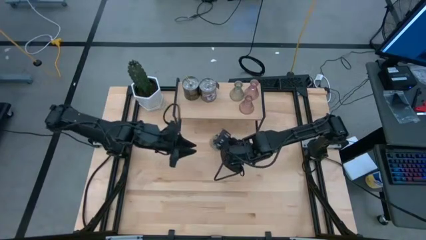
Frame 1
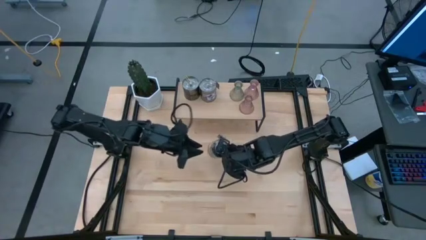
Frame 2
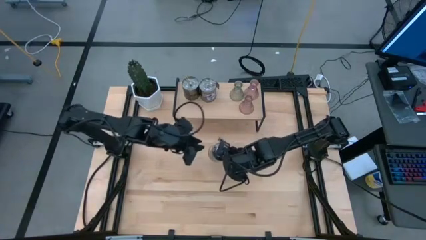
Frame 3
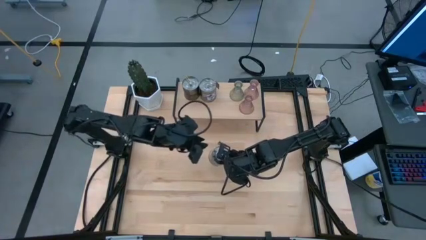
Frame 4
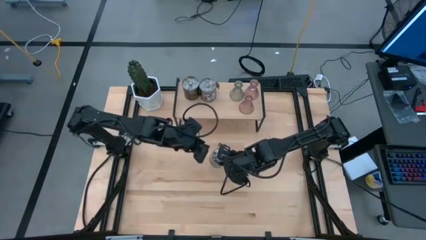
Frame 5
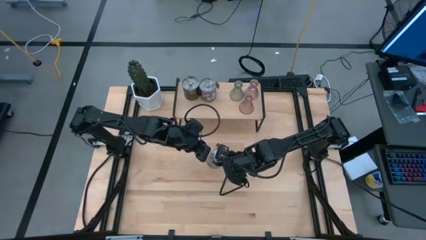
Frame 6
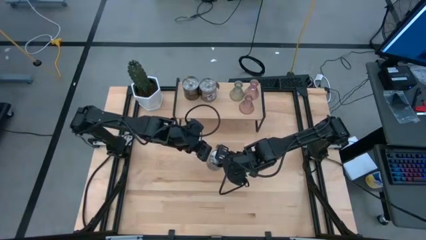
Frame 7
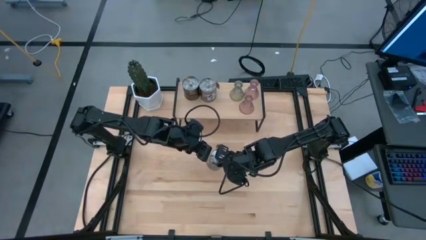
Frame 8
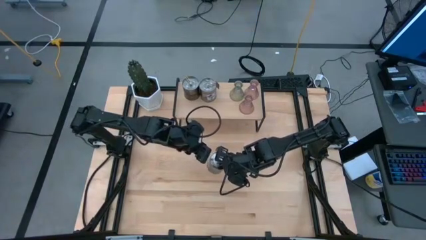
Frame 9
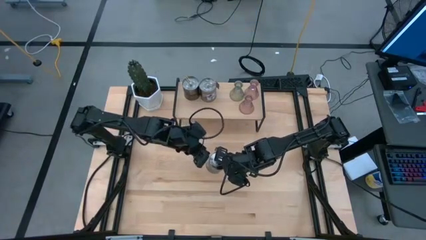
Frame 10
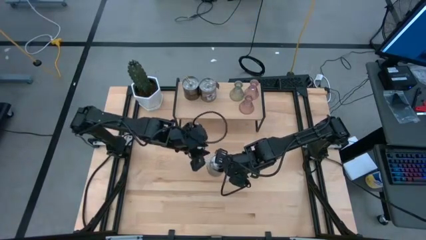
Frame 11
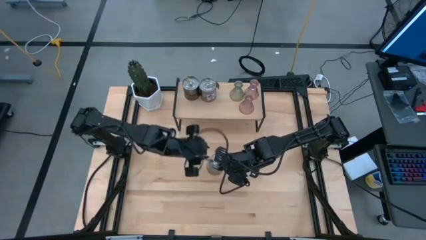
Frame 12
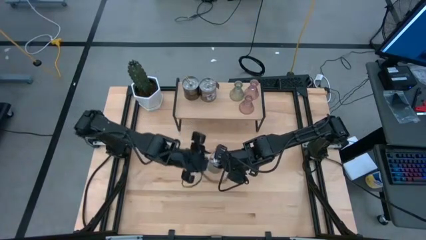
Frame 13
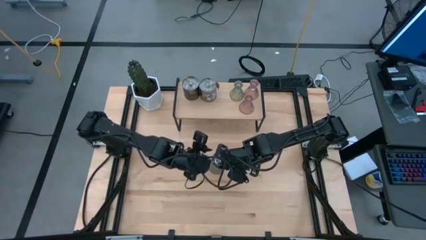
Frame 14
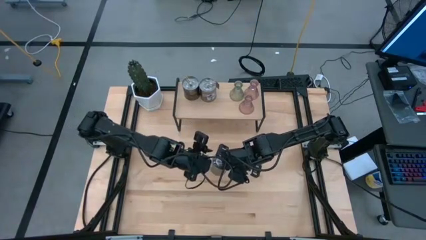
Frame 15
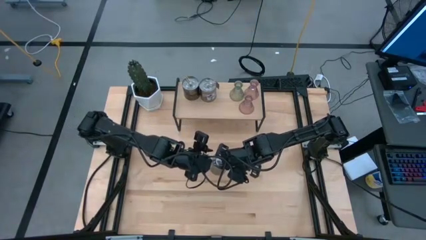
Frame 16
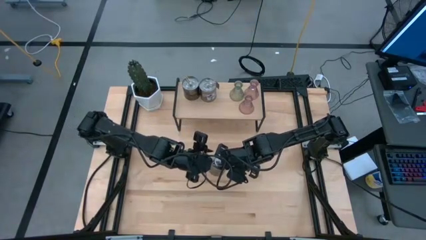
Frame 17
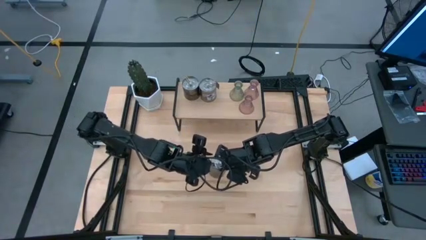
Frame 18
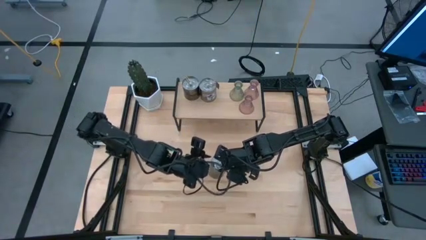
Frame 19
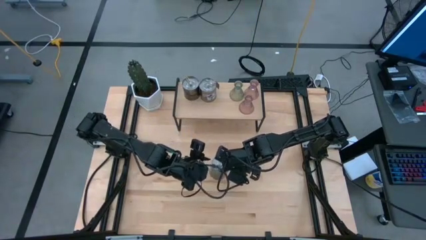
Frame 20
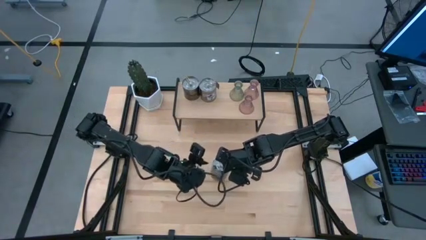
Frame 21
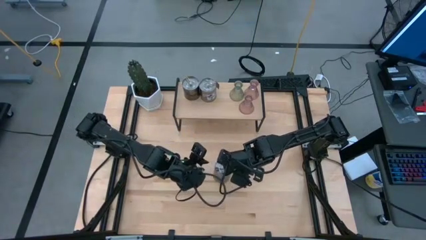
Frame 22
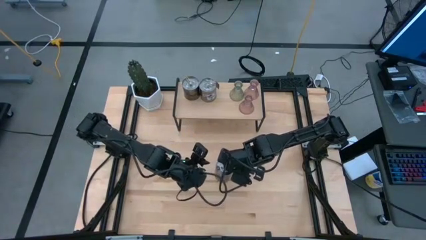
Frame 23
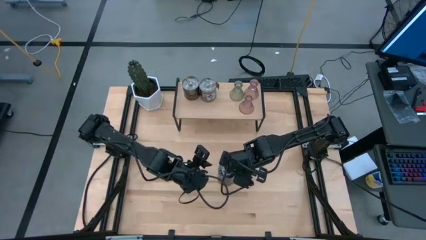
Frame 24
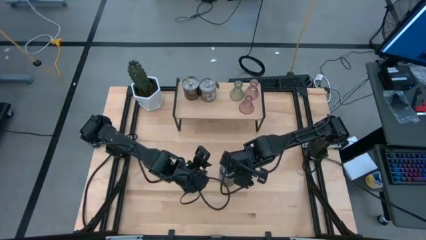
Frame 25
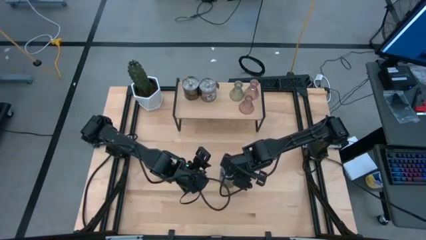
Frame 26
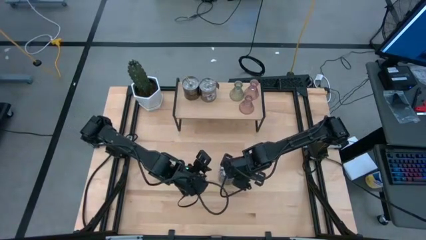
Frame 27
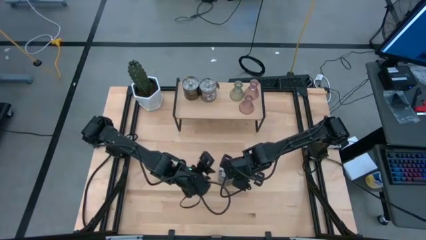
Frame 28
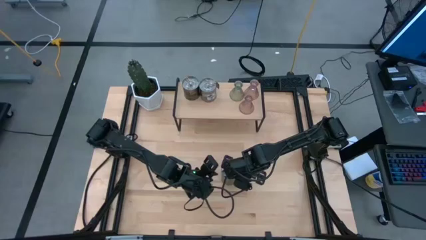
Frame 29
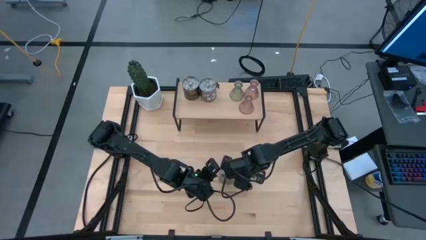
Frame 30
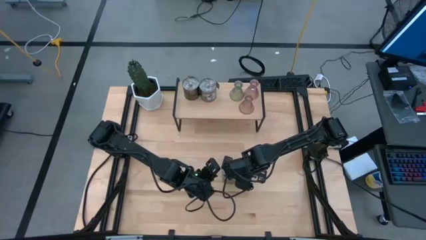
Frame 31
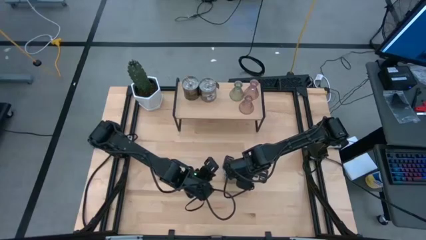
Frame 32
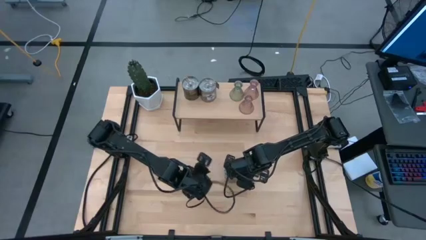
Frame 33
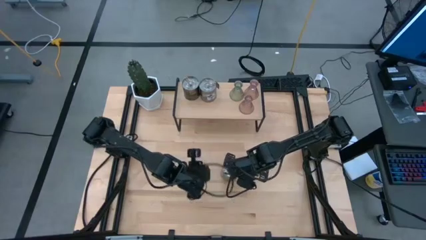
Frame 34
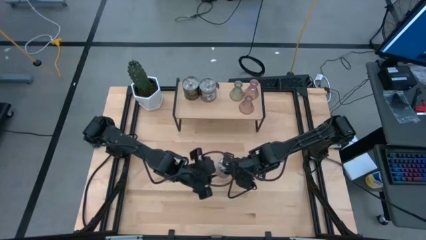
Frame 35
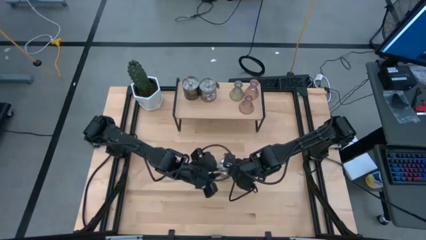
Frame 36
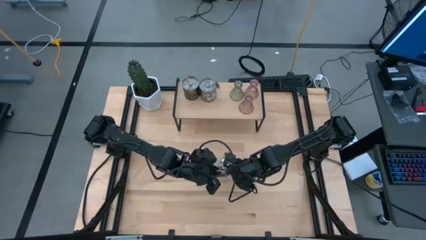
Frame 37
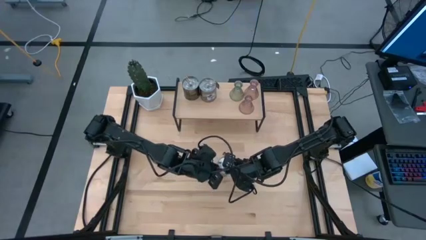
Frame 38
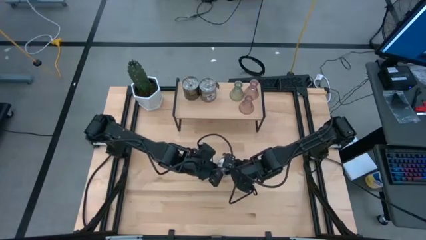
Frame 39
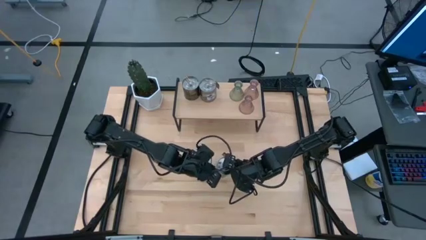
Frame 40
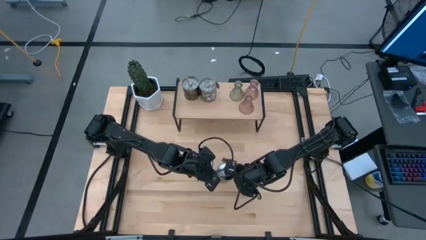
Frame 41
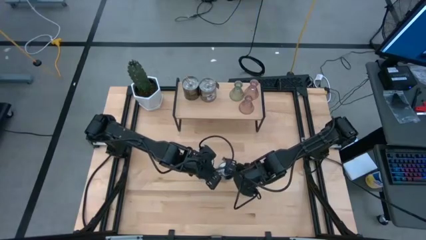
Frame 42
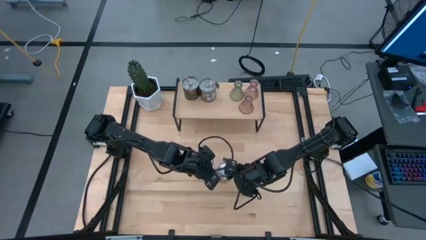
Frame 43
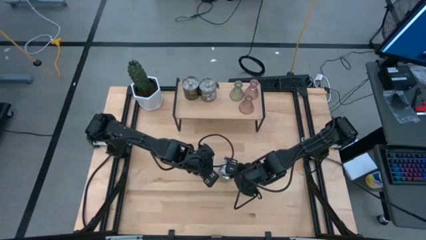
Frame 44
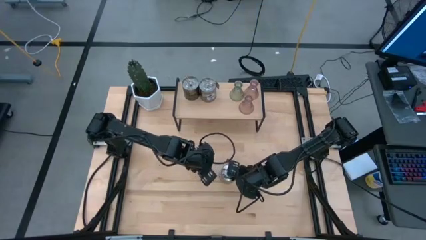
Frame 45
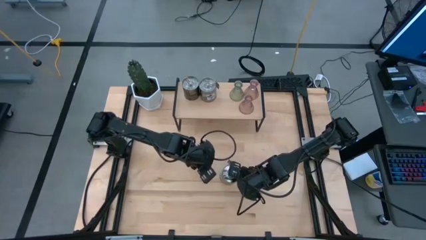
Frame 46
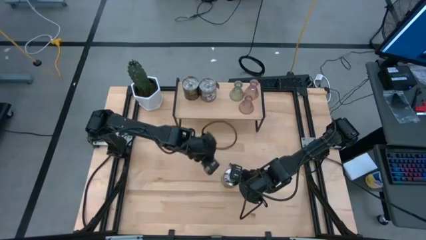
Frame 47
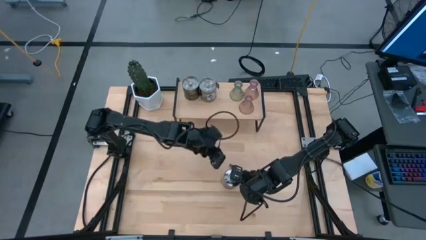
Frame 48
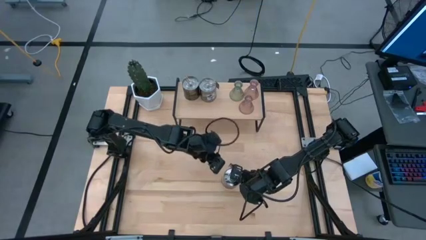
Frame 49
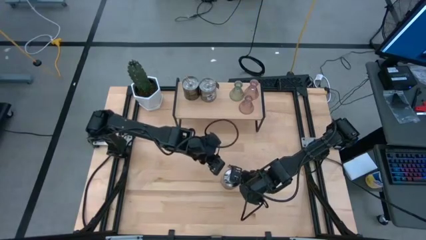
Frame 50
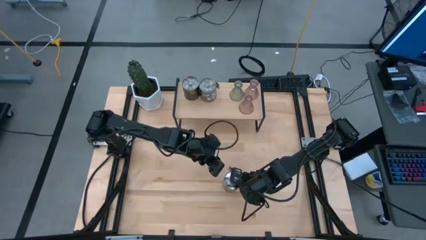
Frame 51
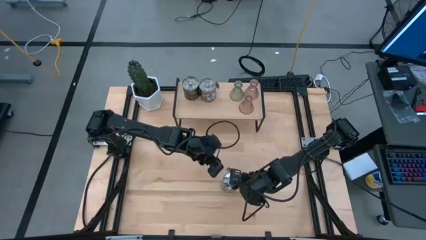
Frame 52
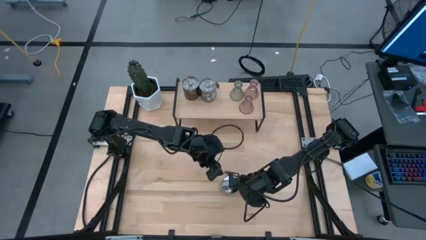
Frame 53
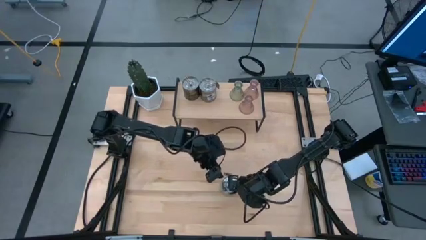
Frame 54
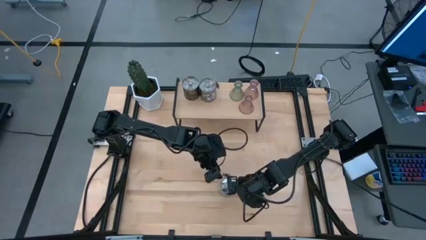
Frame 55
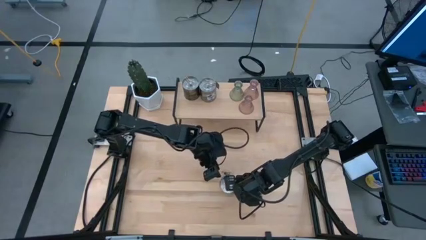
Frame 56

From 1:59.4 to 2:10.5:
Task: Pick & Place candle stick holders
Put the brown scented candle on the shelf

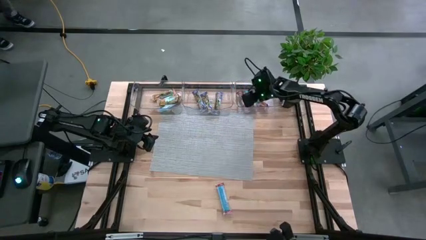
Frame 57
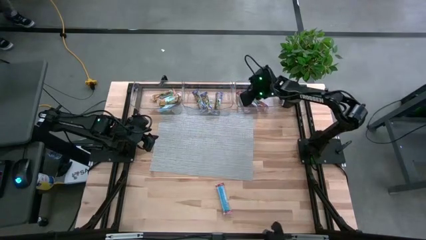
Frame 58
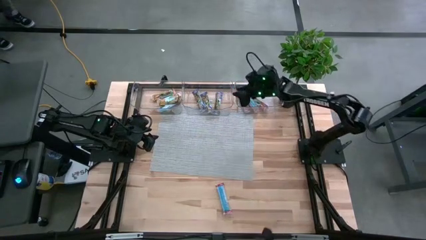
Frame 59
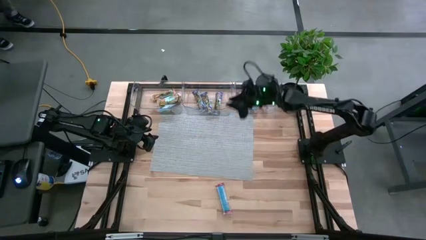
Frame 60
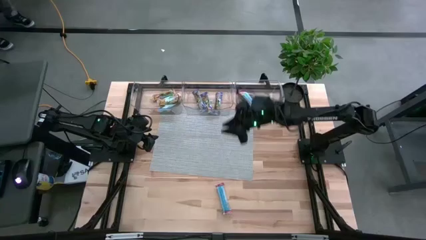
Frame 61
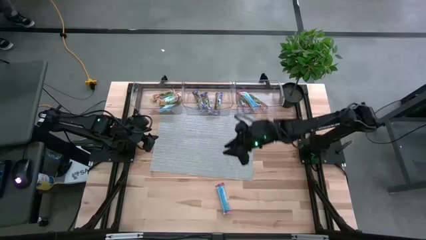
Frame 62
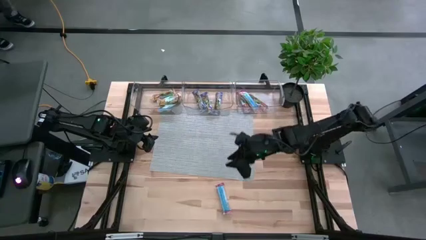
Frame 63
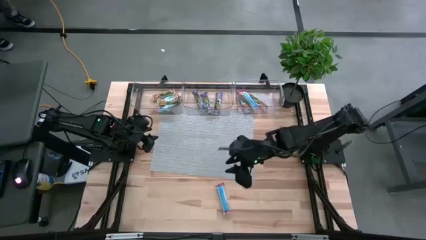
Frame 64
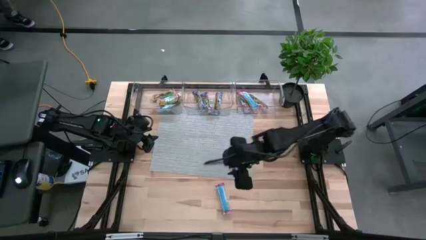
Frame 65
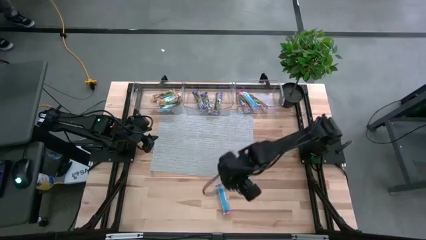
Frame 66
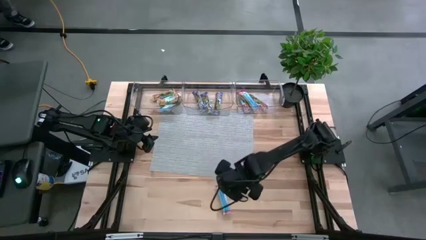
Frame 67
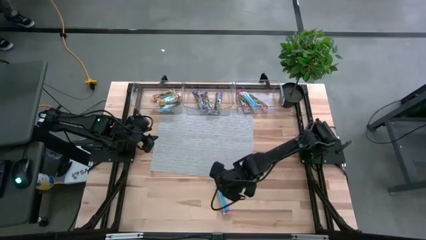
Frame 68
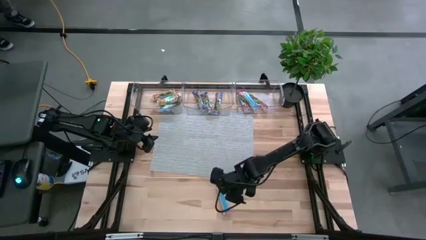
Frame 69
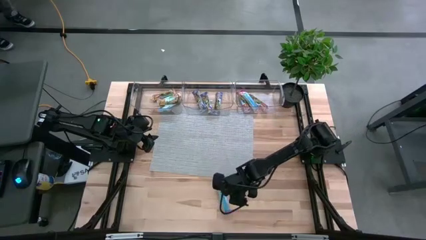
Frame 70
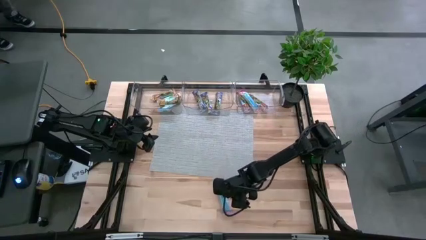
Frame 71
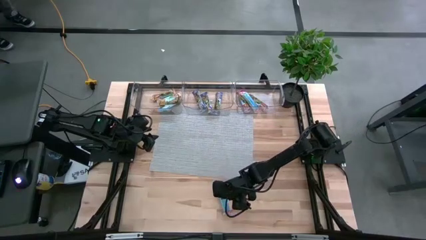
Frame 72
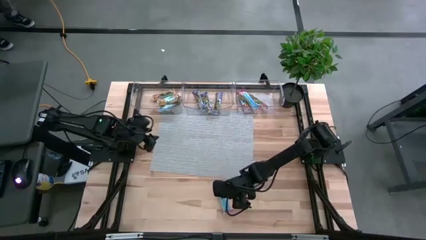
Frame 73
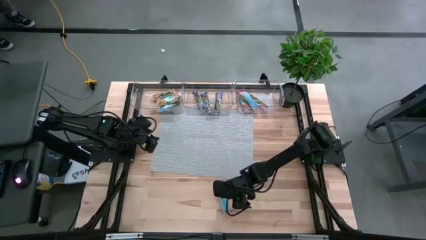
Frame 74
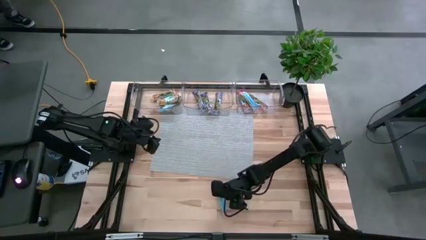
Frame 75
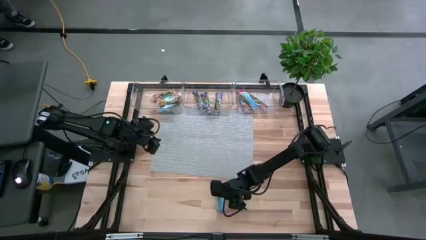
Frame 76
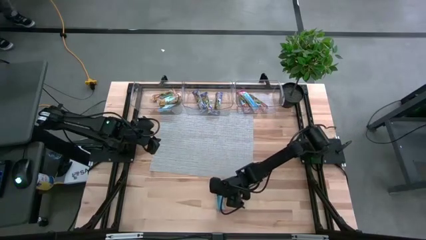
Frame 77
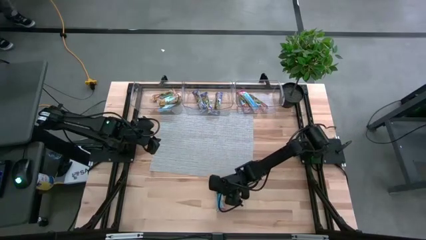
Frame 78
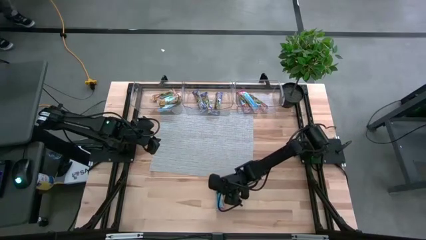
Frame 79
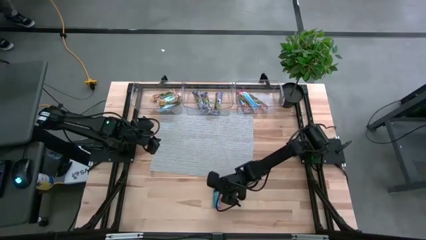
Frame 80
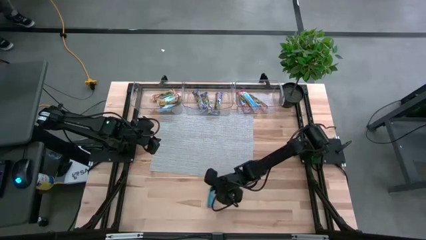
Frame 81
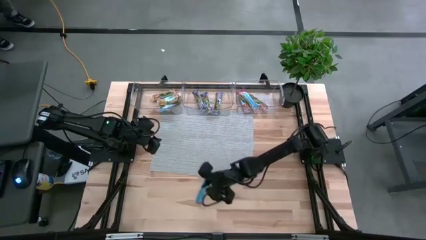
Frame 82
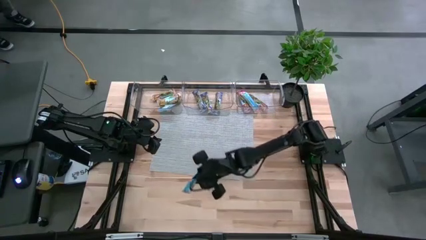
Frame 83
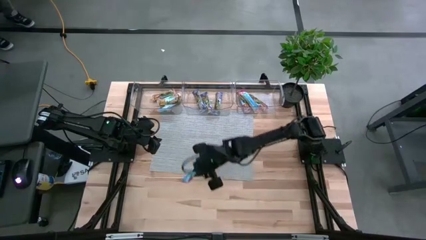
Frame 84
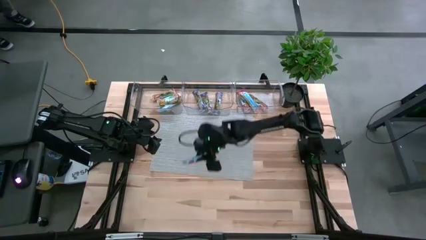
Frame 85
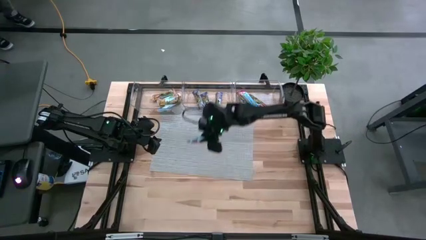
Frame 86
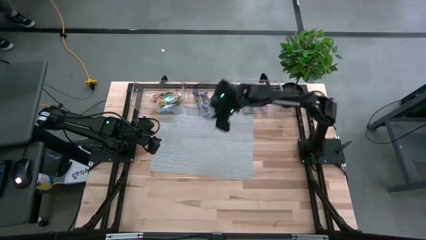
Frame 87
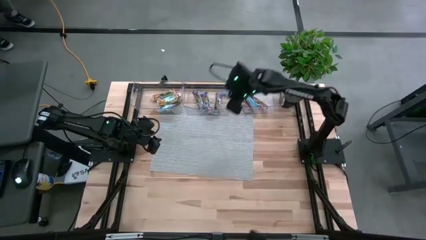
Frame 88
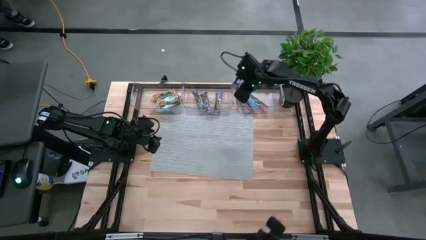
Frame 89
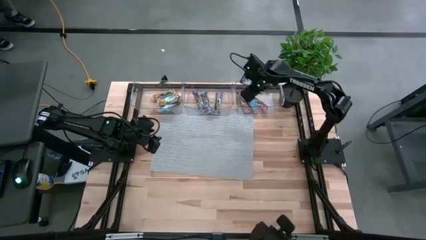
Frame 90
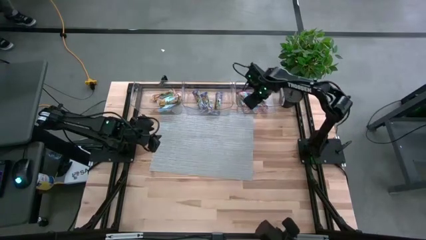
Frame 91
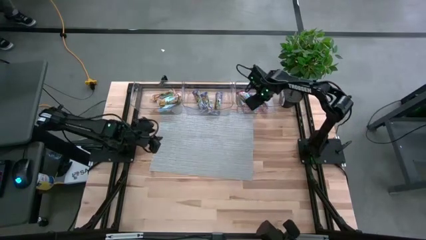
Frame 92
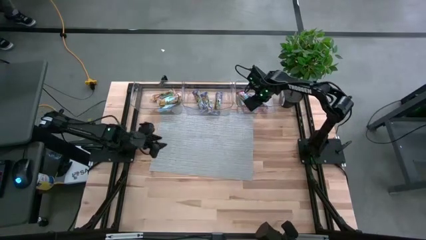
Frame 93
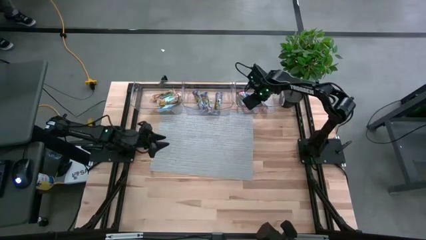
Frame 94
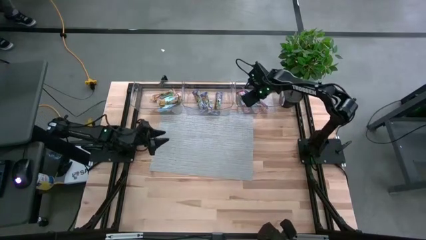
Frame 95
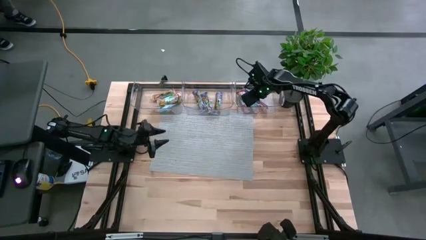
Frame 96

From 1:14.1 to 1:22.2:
Task: Pick and place Granola Bars by type
Put the red granola bar into the right transparent bin
